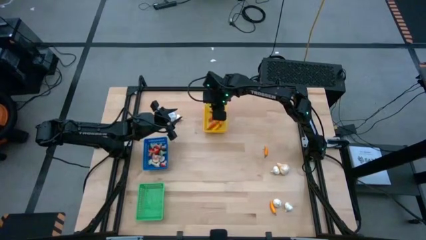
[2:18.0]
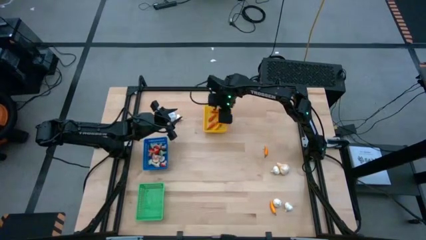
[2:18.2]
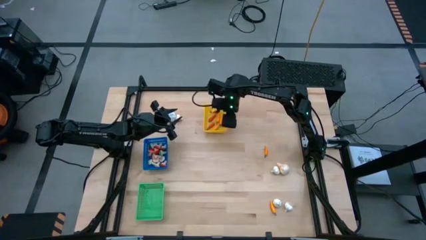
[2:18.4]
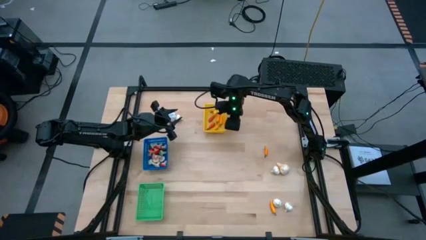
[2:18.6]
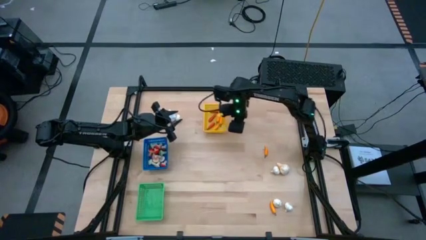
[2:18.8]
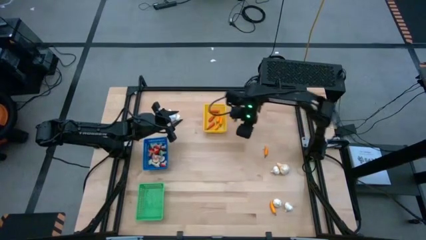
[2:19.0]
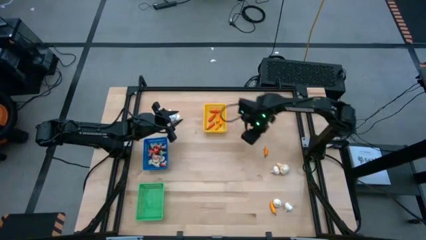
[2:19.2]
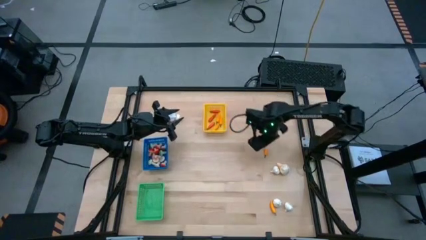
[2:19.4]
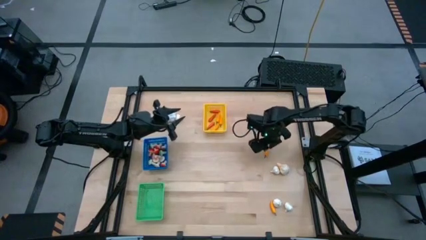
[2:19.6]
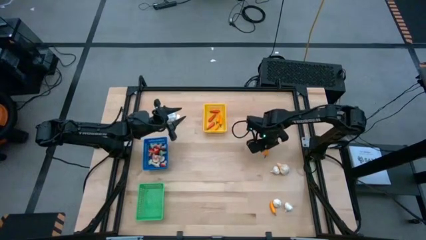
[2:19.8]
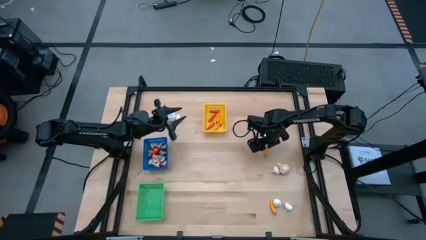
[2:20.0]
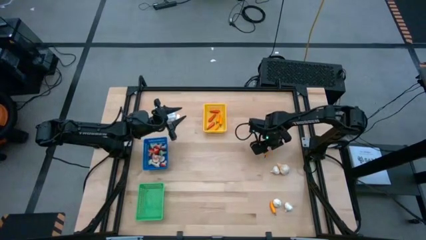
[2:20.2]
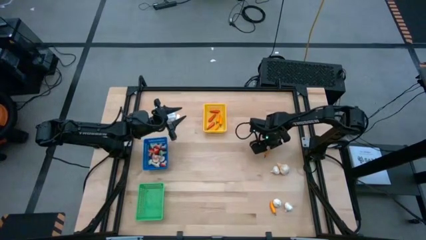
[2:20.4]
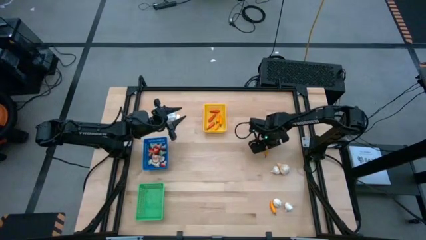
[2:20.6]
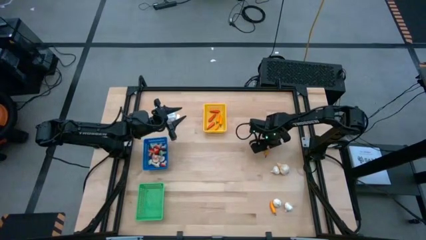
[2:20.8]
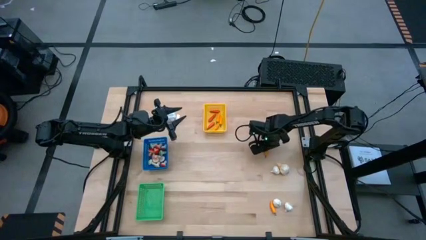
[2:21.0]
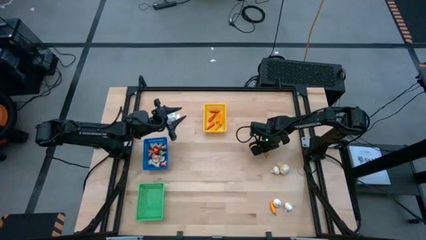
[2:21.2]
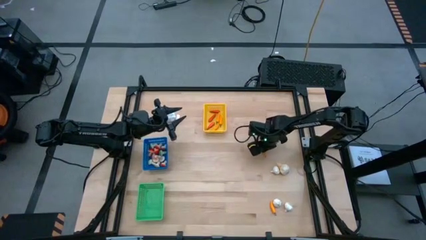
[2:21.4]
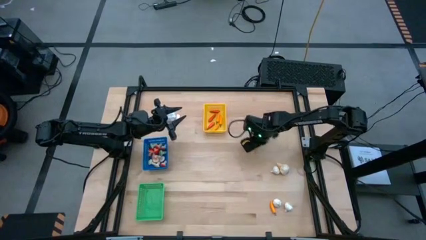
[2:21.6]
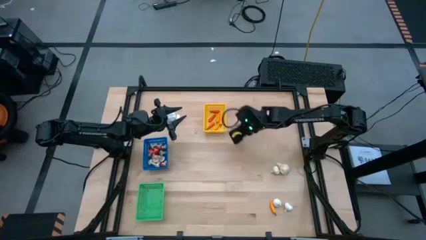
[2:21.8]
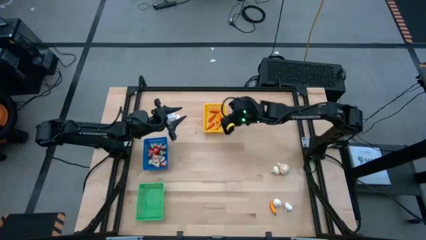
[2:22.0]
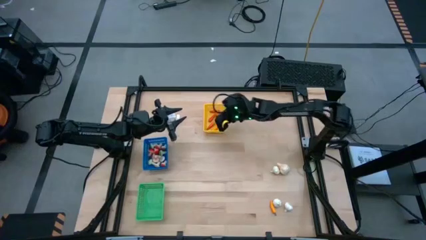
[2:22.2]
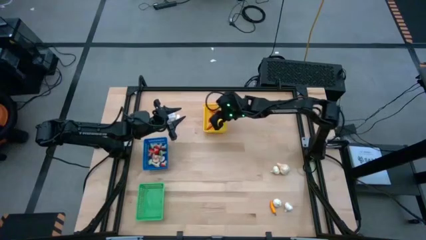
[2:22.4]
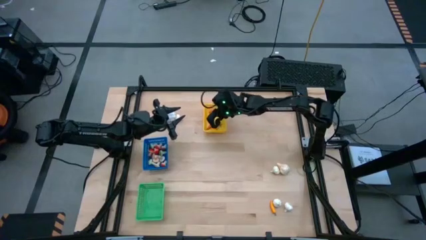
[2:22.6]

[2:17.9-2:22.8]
Task: Sort produce into baskets
Put the yellow chili pepper into the yellow bin

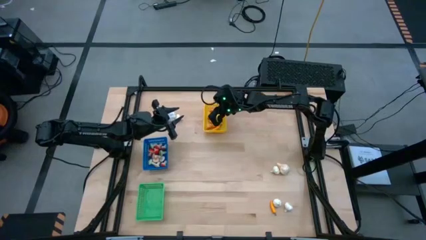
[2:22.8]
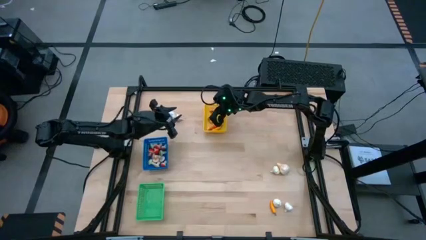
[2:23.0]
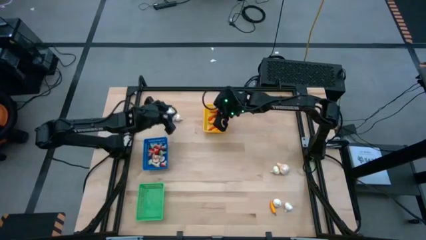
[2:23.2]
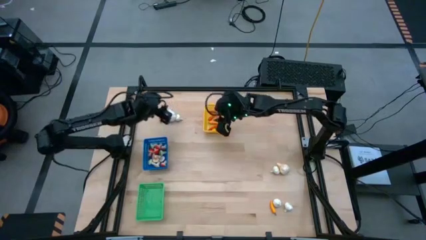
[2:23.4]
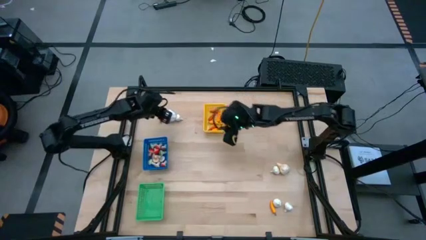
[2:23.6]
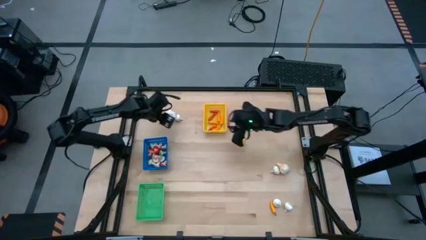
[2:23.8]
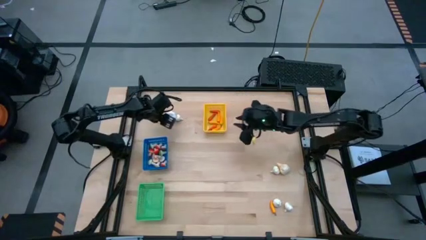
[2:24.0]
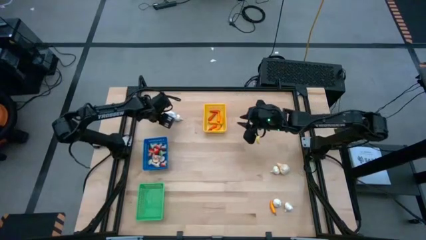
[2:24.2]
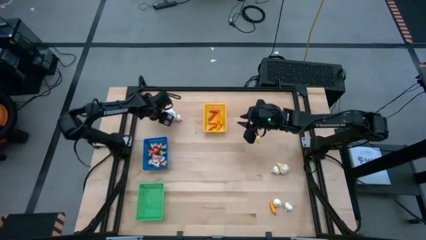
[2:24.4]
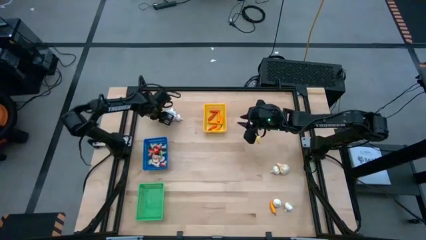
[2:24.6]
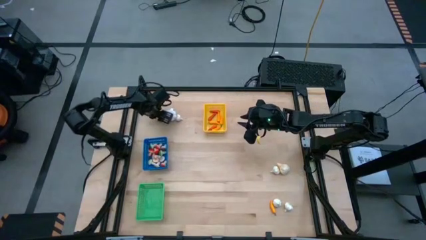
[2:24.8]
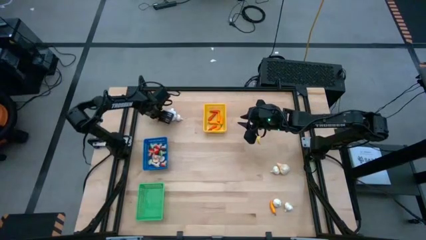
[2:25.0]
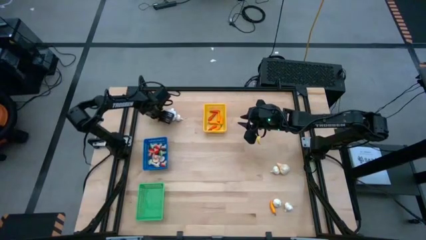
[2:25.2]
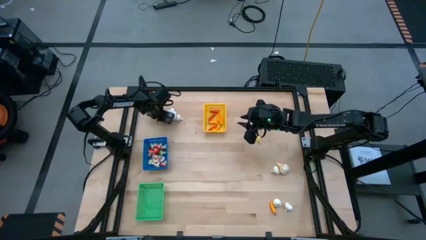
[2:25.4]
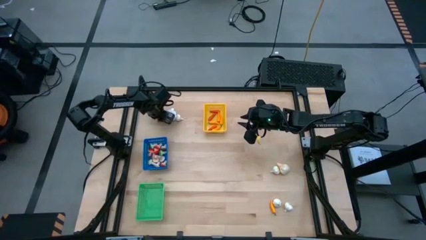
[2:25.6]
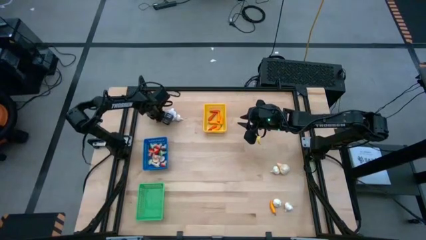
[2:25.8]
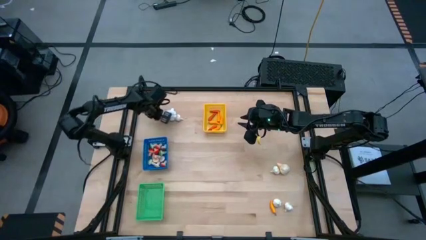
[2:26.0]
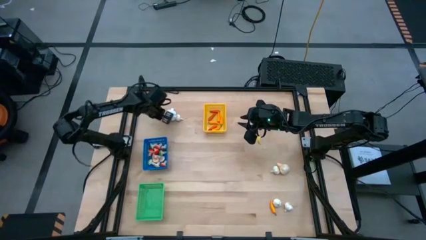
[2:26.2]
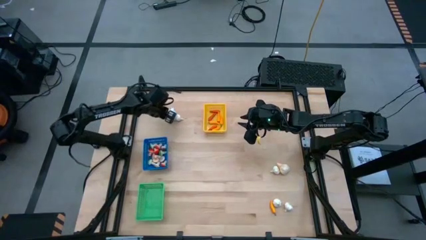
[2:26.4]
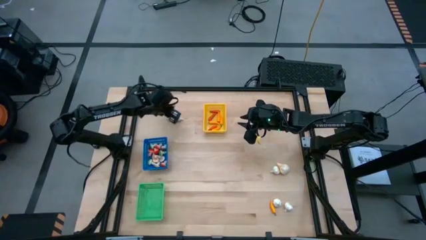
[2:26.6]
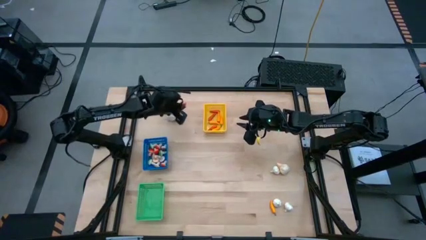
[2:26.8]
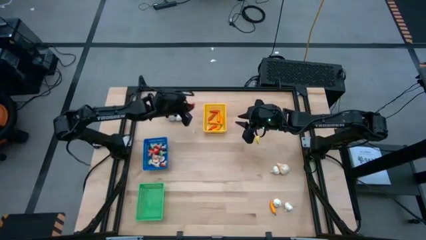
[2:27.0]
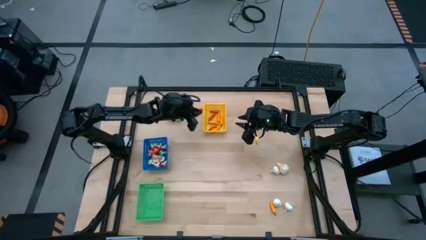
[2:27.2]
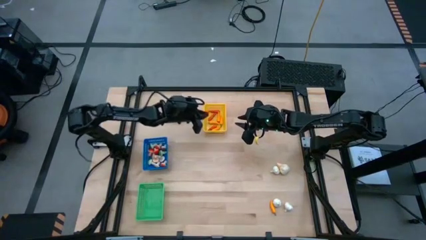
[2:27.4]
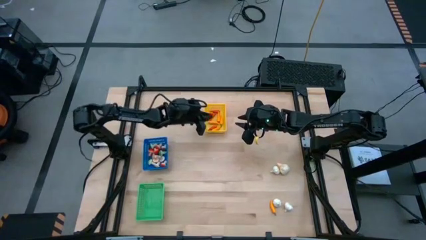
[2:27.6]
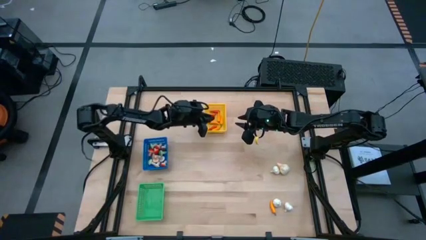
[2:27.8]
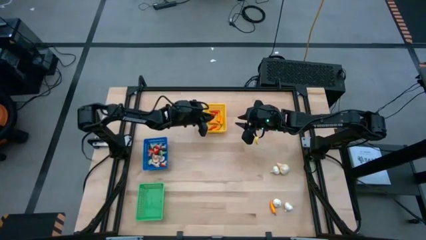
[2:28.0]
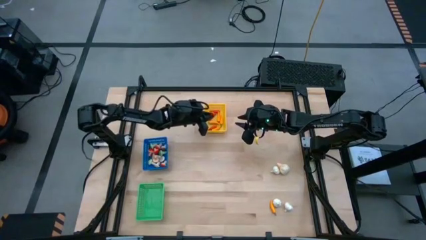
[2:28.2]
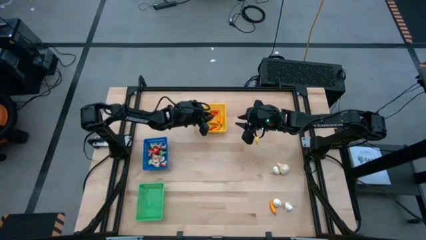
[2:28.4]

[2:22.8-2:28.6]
Put the orange chili pepper into the yellow bin

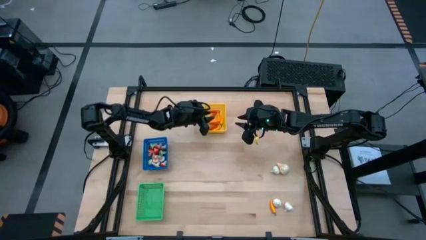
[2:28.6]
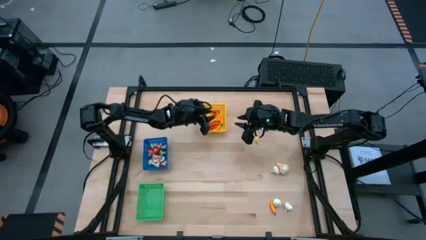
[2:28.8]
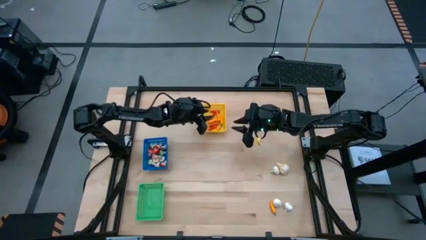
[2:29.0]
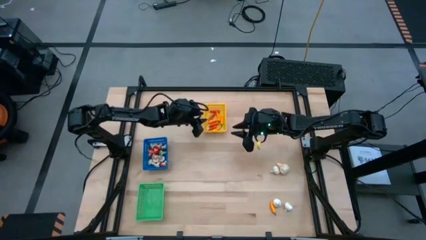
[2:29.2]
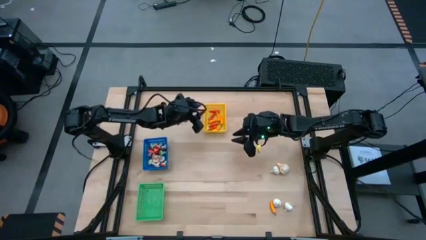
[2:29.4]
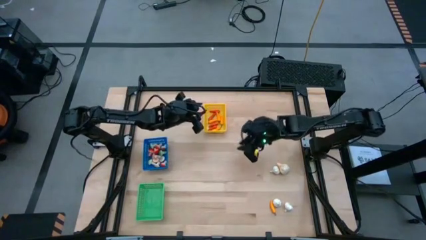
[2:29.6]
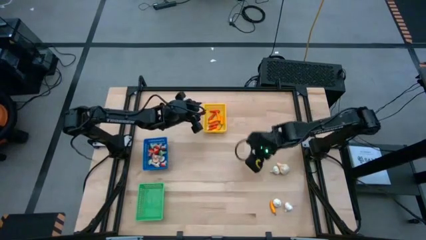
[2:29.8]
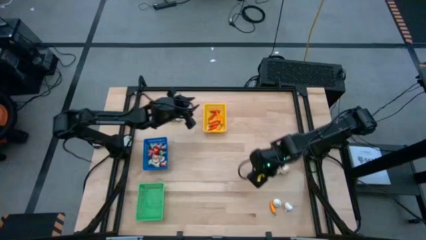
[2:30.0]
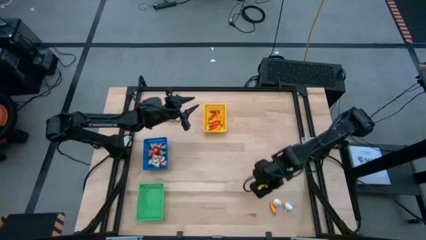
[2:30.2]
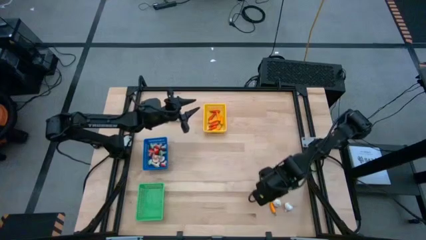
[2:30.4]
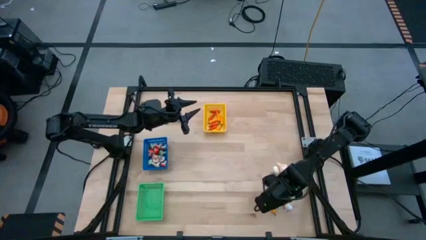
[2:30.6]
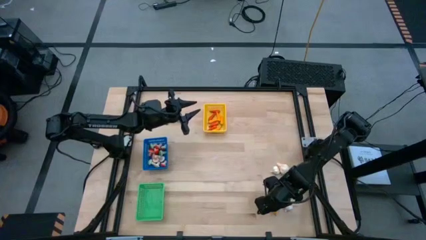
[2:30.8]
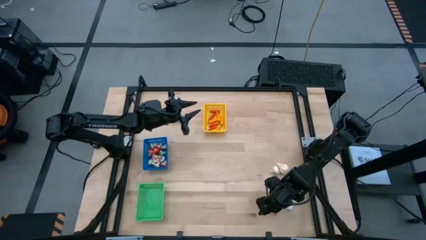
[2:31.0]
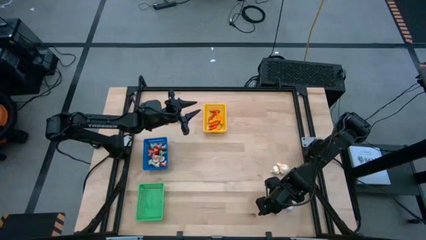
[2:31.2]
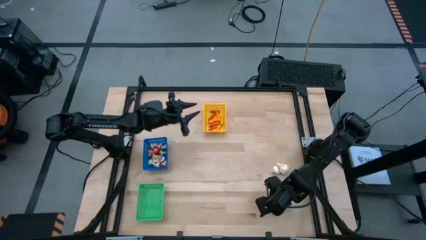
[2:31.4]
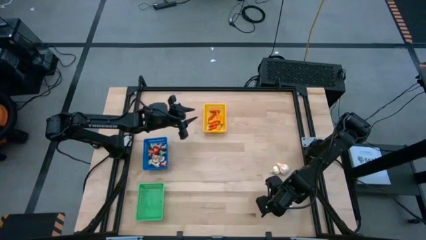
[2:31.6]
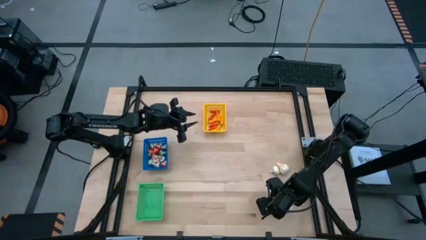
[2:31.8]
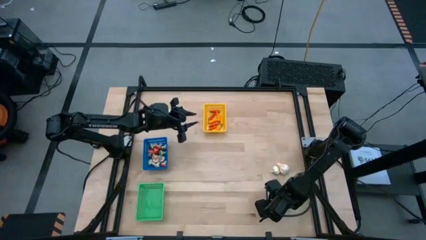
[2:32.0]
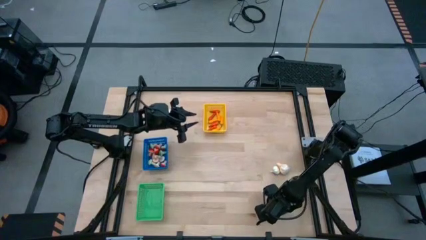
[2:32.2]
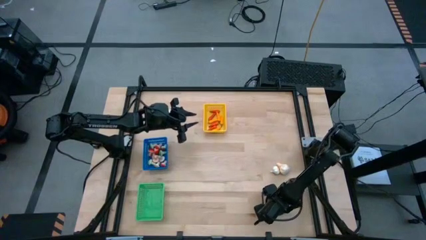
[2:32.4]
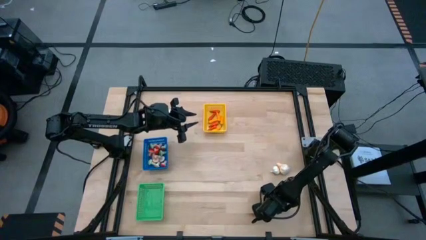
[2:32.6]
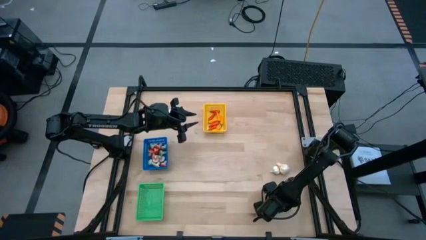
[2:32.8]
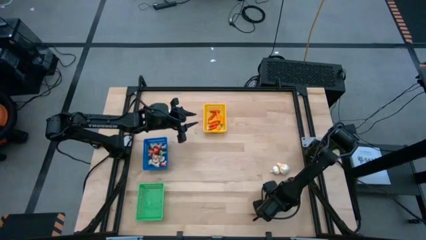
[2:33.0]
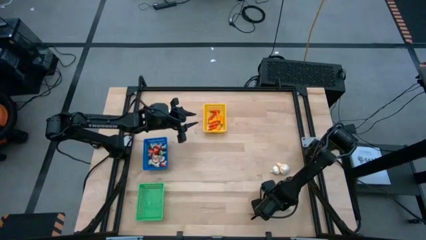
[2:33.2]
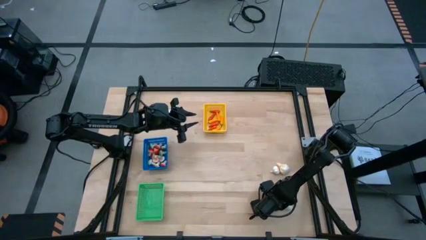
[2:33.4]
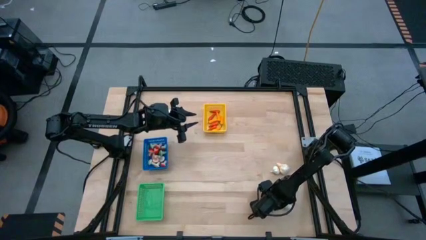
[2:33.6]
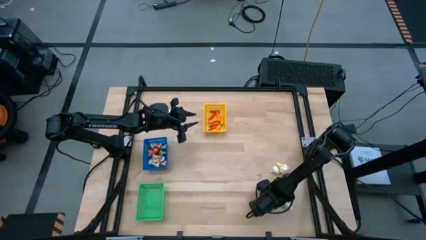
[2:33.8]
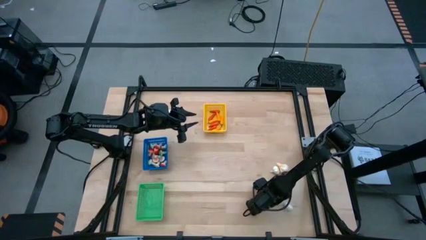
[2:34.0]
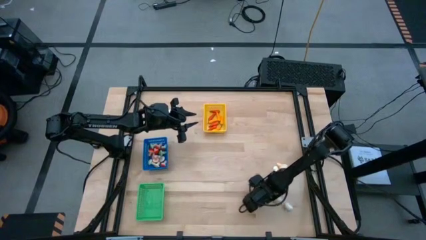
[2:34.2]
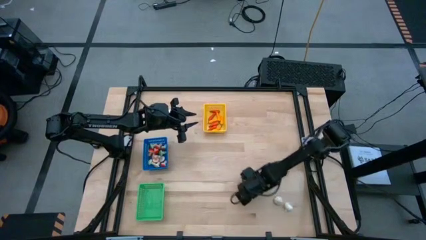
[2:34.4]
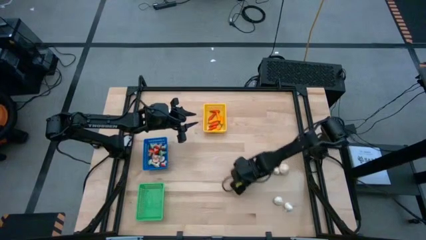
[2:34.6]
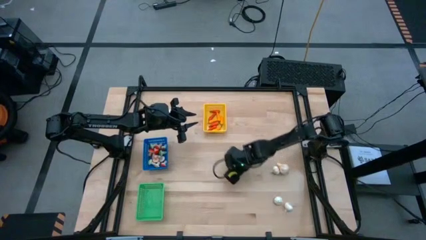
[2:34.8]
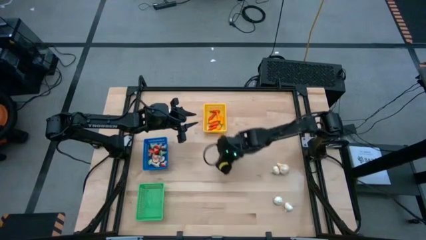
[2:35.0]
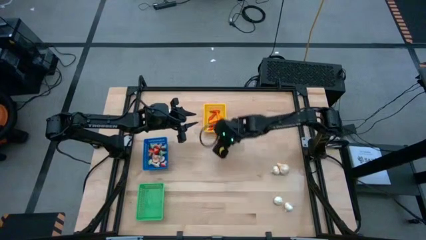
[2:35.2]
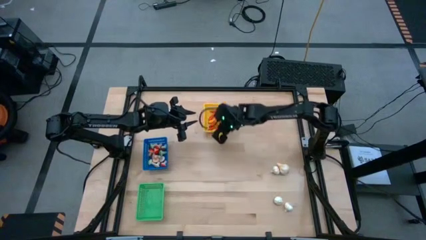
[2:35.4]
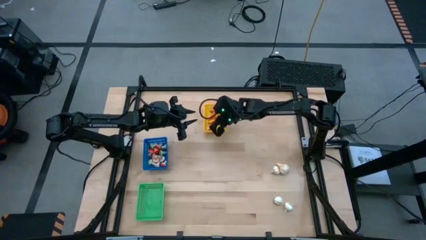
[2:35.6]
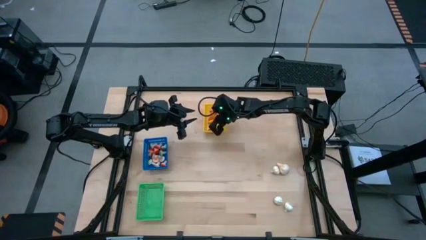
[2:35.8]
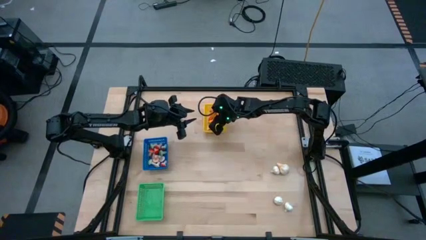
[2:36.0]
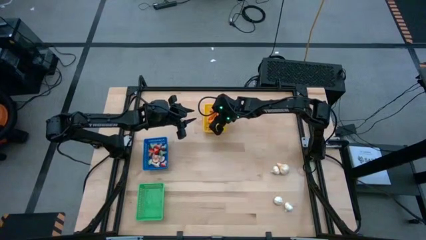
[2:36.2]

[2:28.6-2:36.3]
Put the yellow chili pepper into the yellow bin
